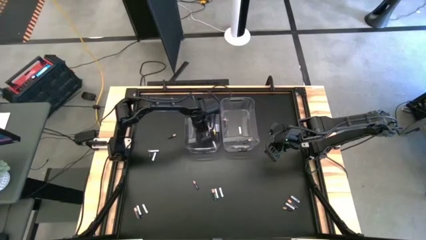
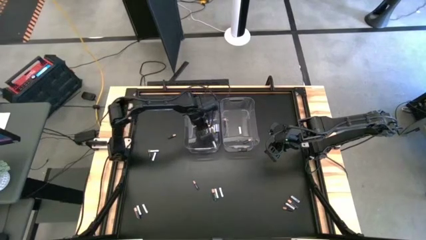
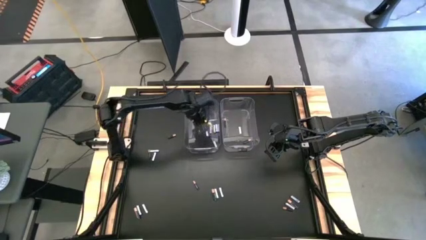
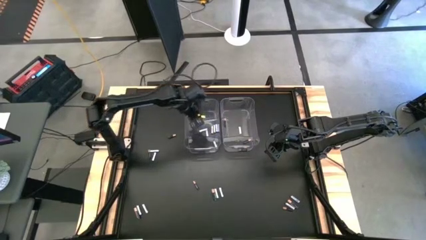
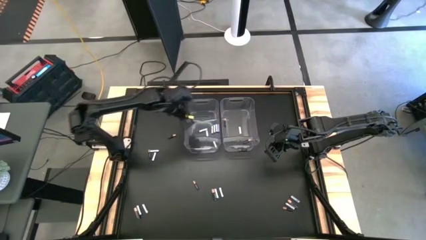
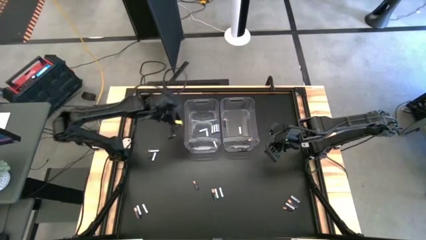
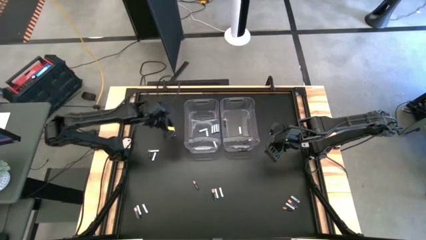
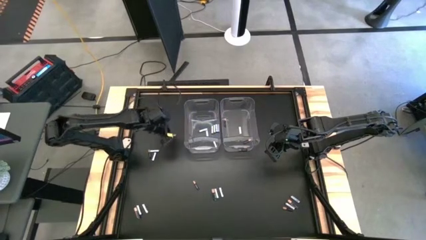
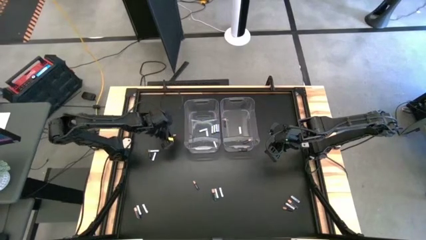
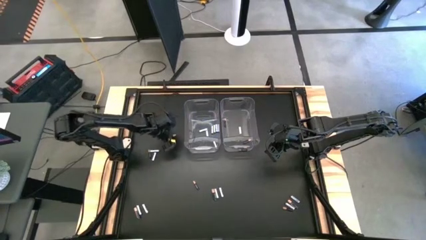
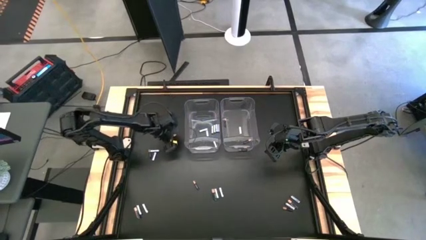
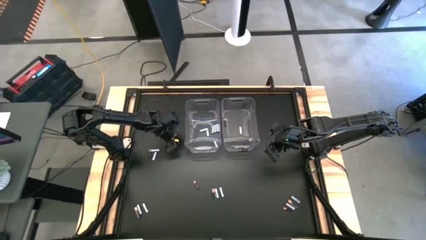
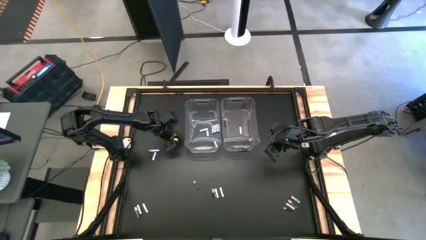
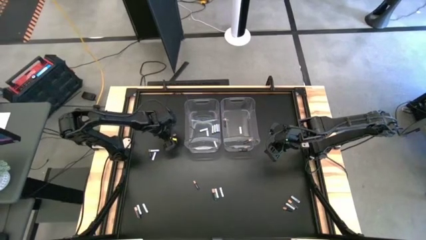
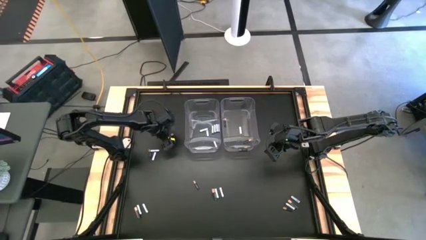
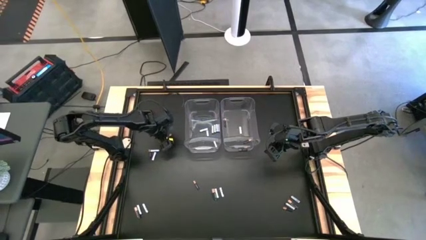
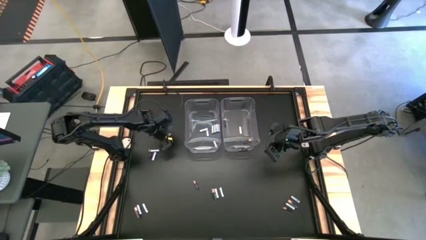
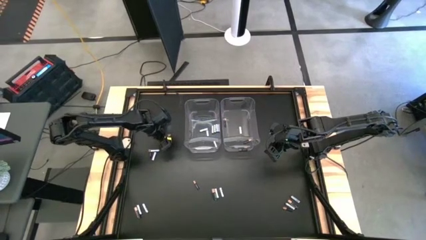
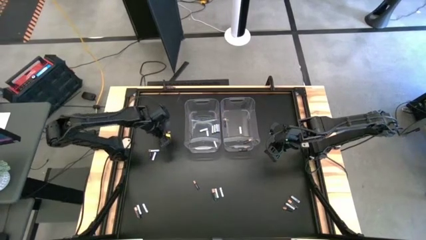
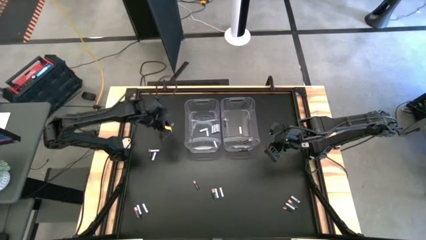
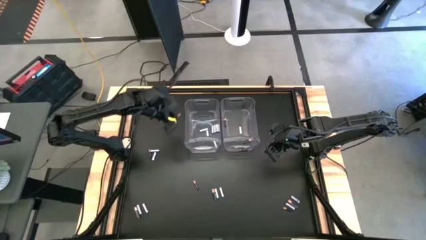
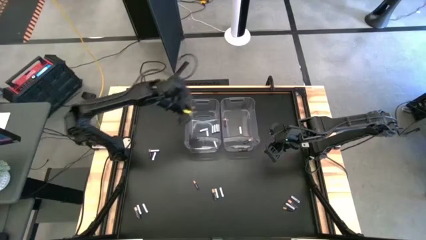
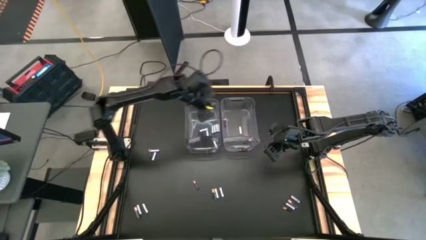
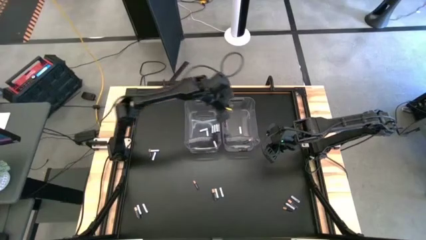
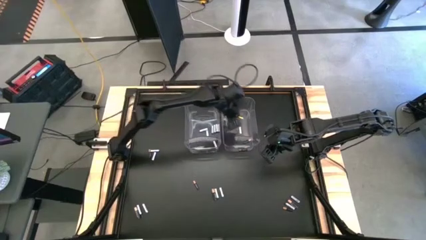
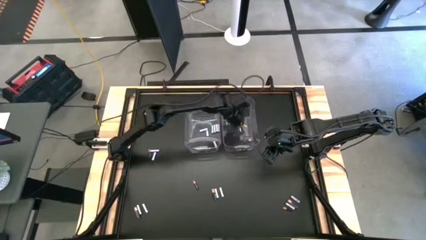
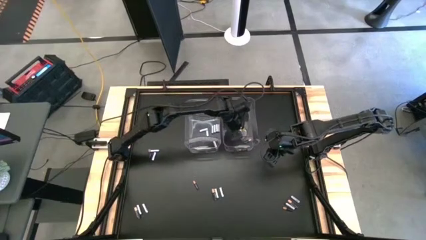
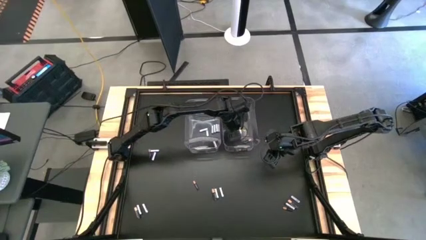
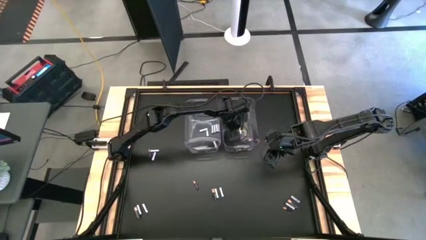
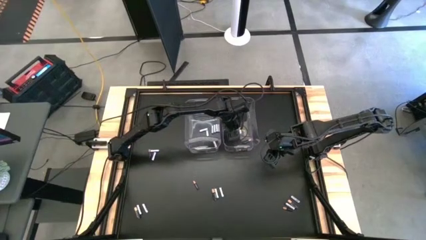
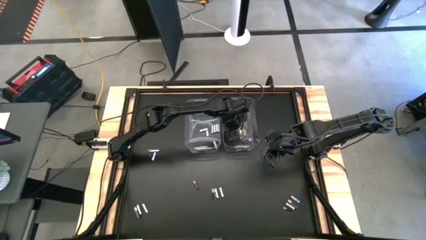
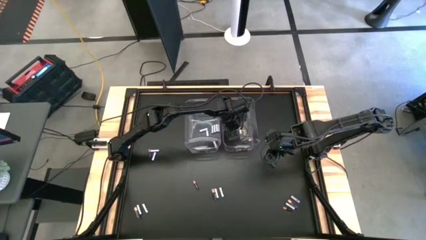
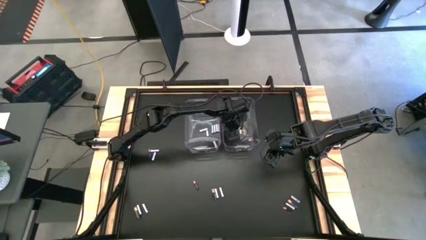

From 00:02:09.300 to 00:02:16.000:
Task: Sort batteries
Put the black battery into the right transparent bin

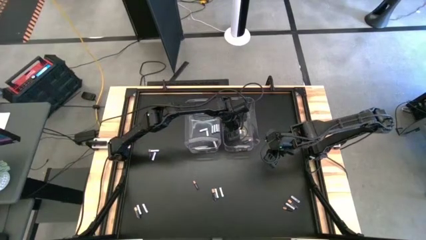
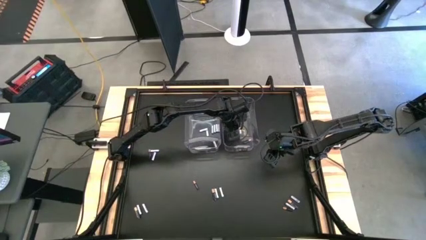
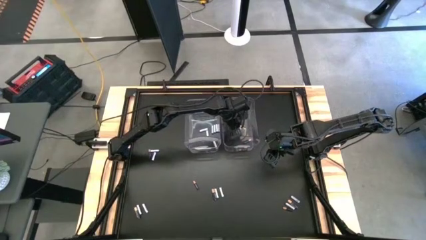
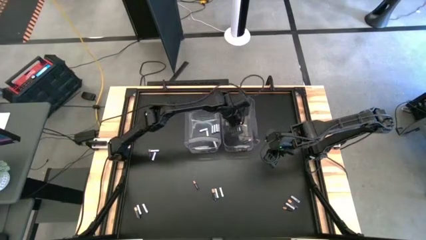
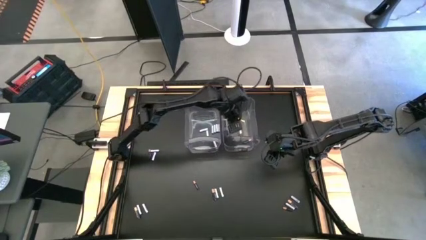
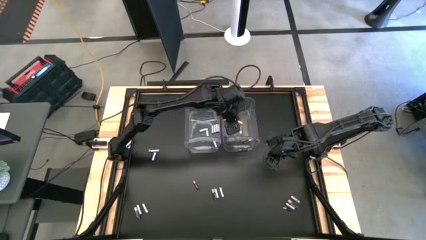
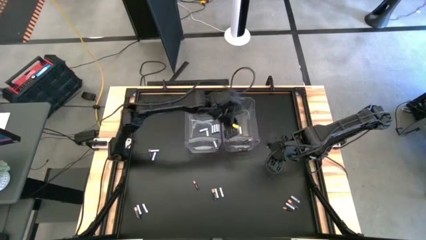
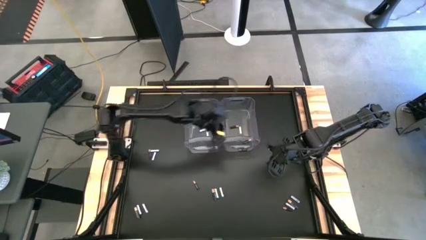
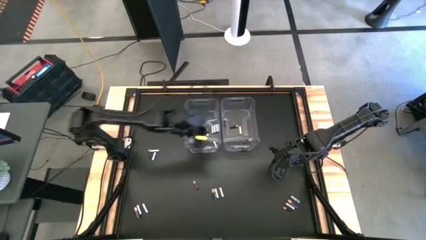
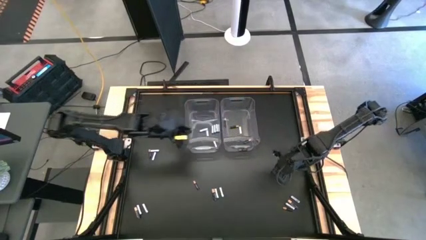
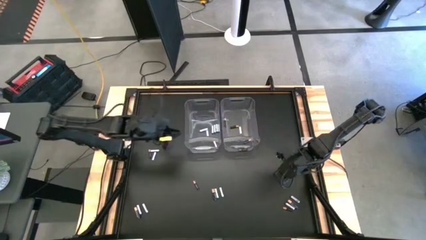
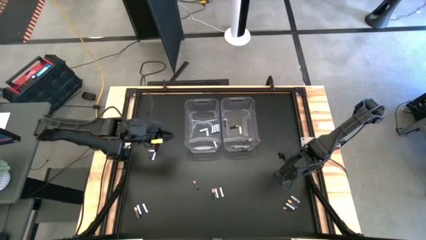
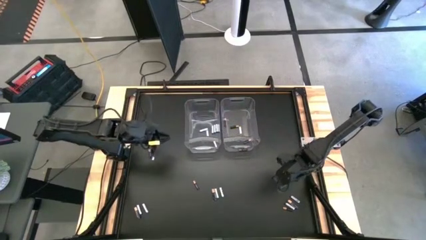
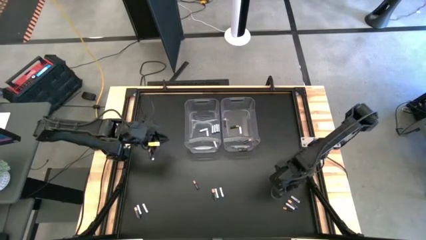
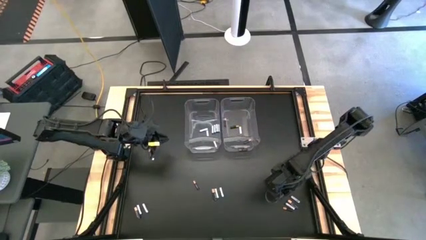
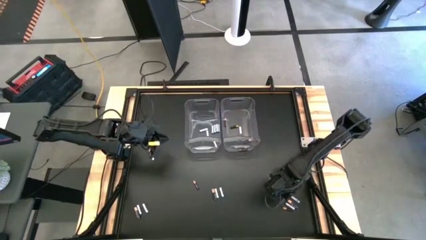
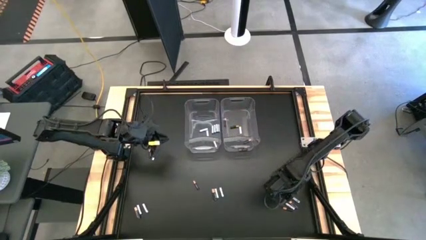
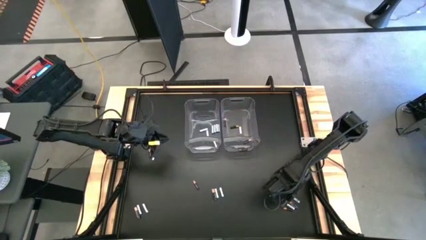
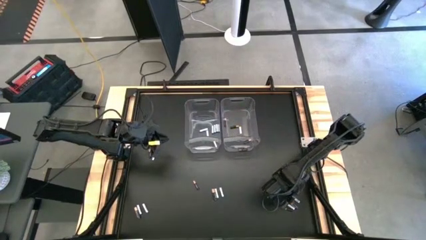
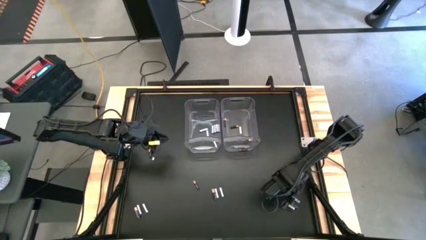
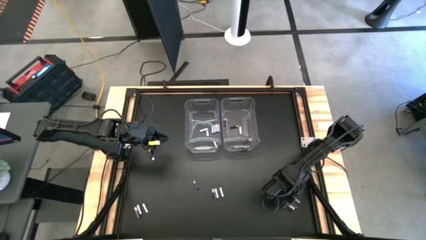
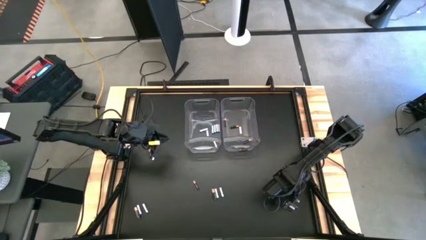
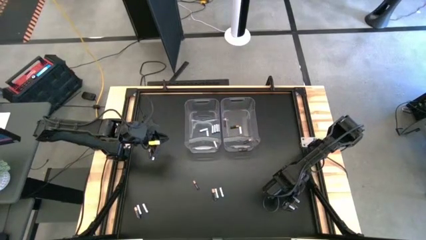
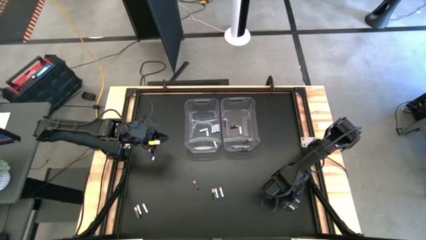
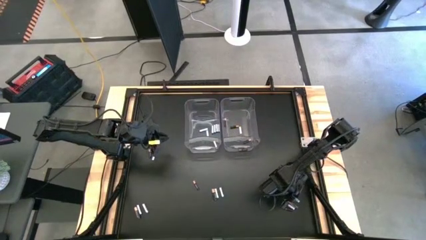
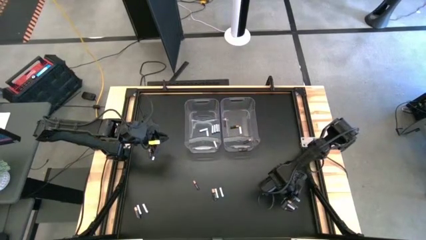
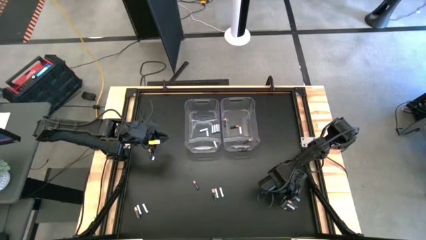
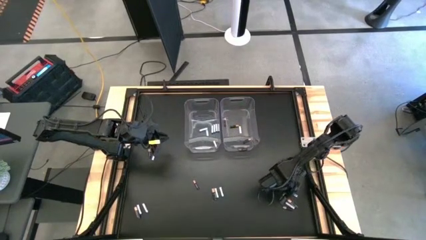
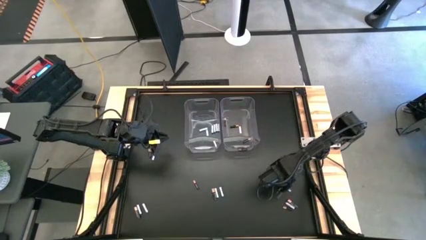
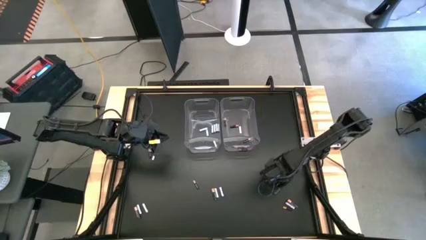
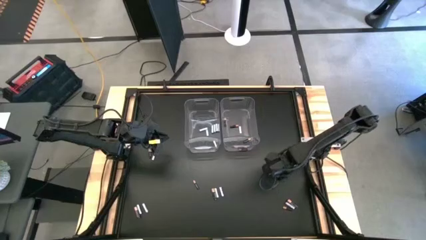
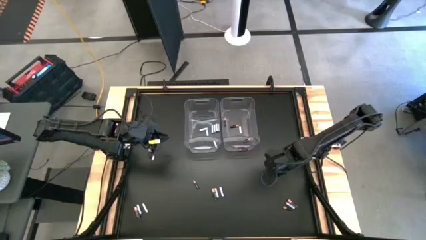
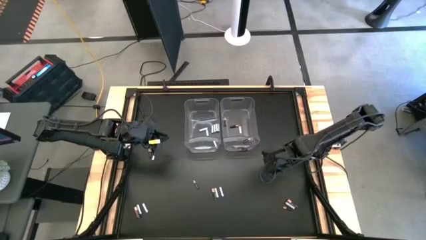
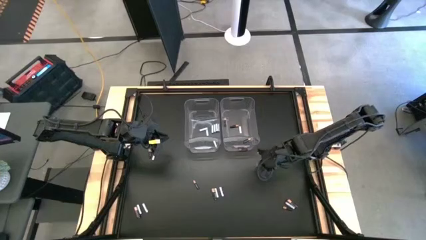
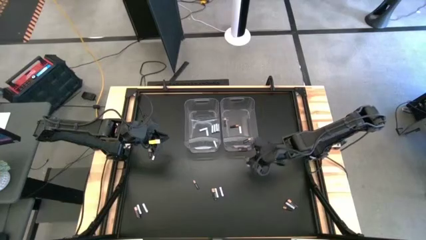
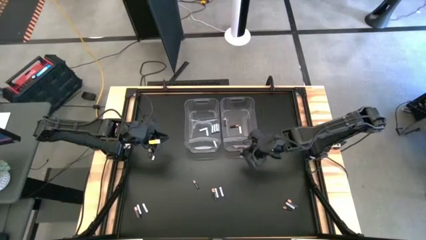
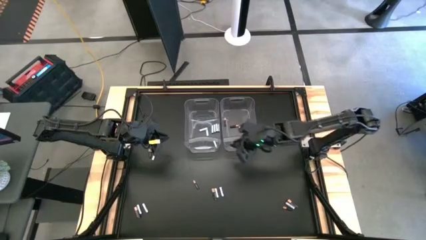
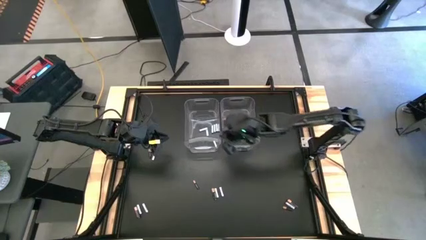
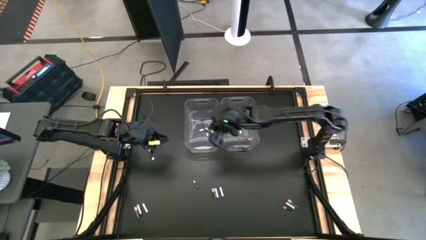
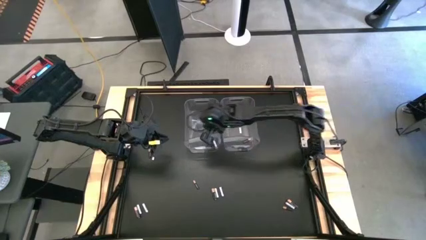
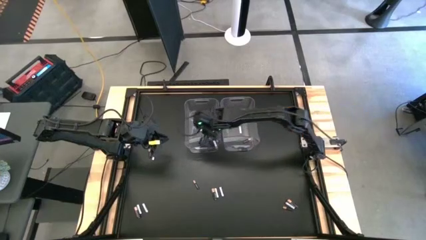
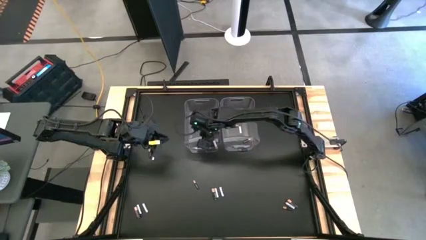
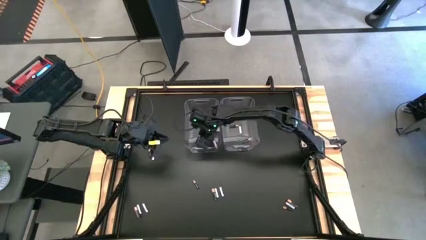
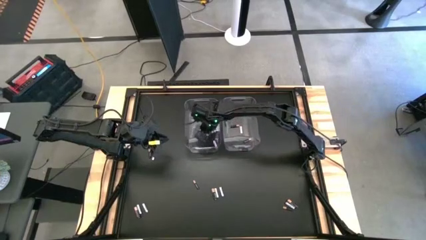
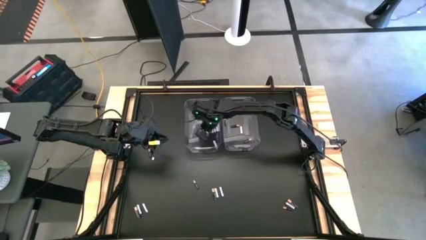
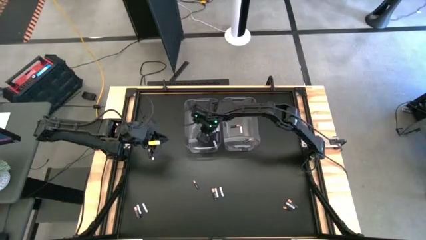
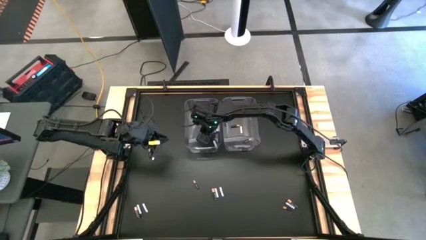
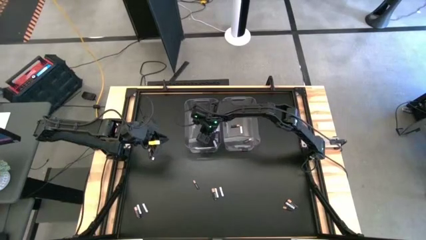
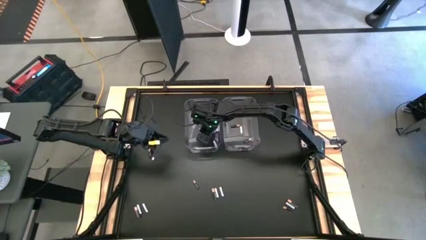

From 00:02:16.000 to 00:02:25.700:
Put the white battery into the left transparent bin
